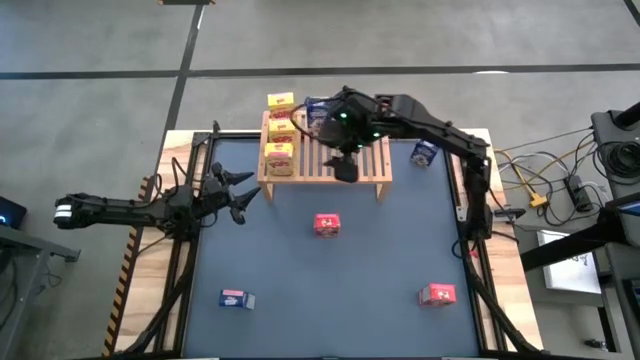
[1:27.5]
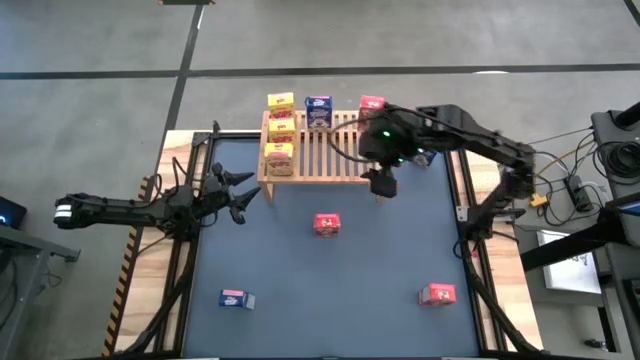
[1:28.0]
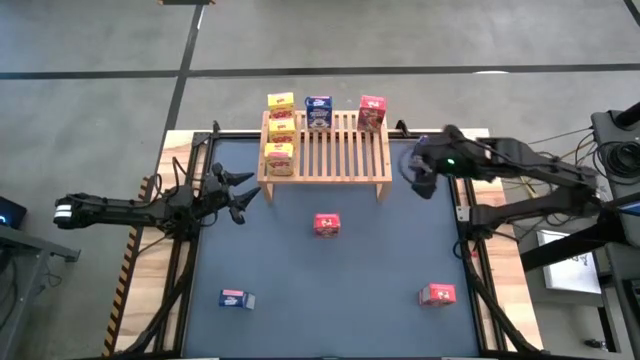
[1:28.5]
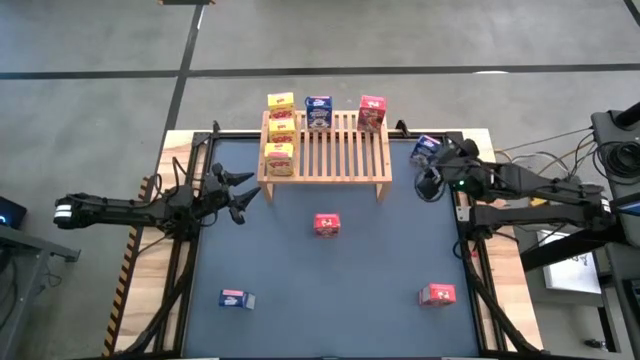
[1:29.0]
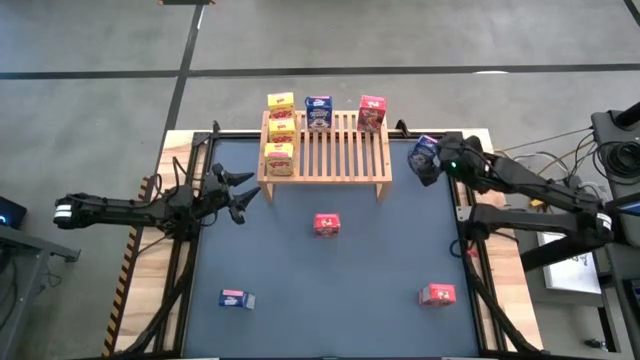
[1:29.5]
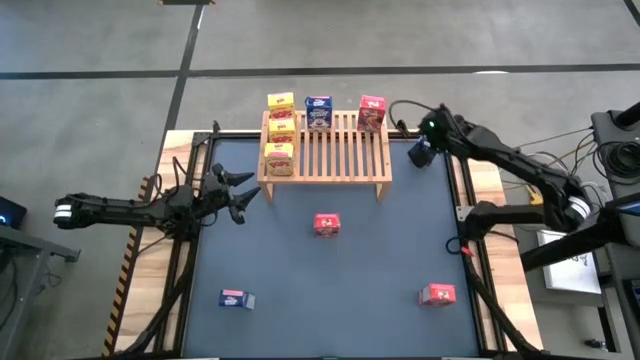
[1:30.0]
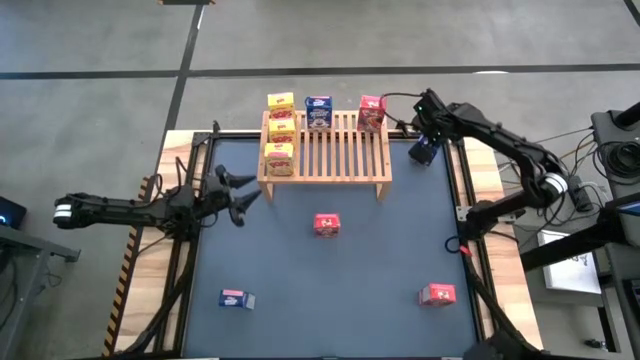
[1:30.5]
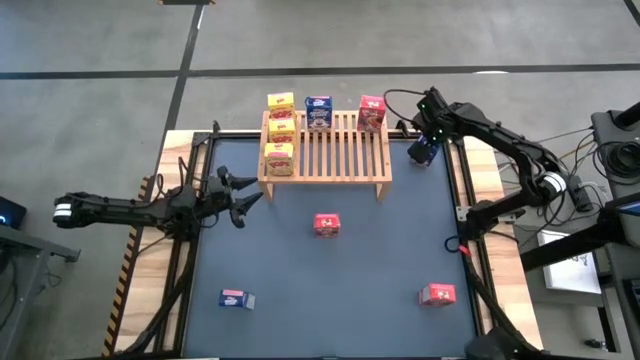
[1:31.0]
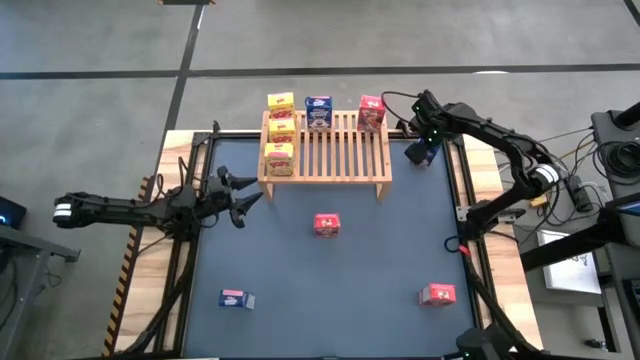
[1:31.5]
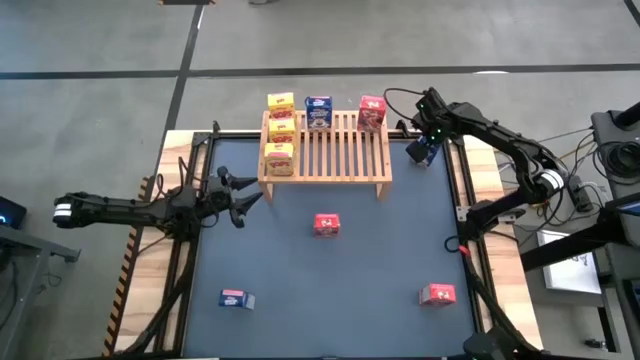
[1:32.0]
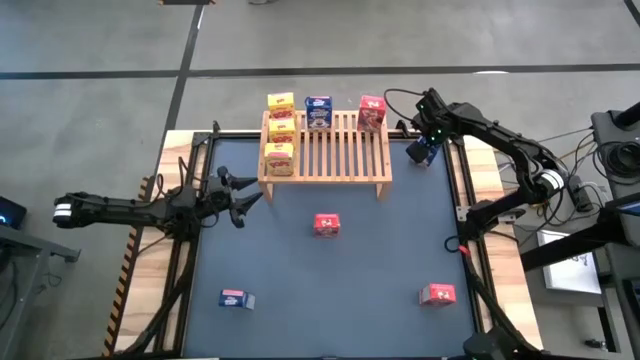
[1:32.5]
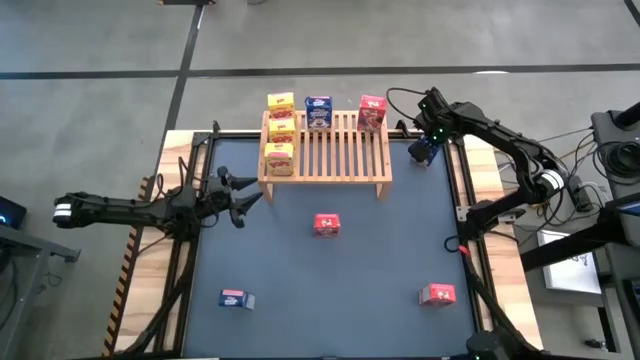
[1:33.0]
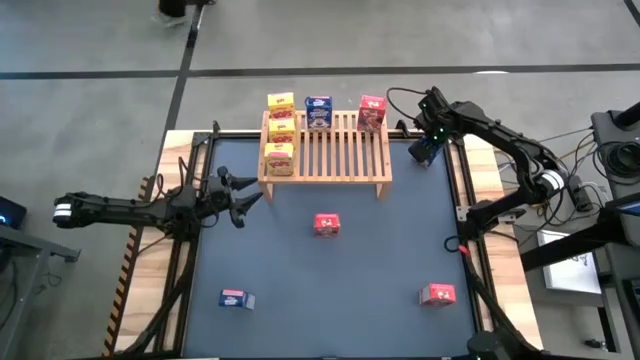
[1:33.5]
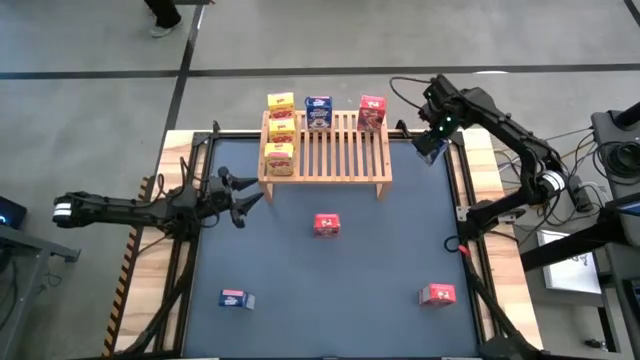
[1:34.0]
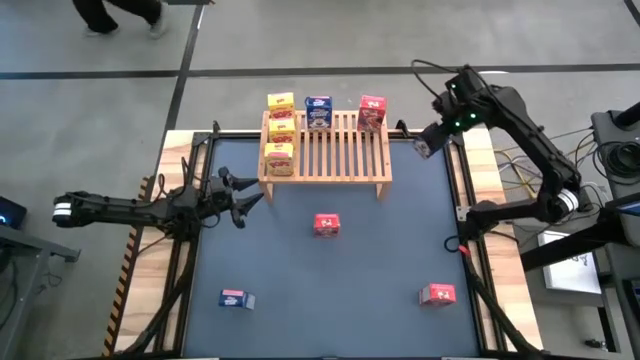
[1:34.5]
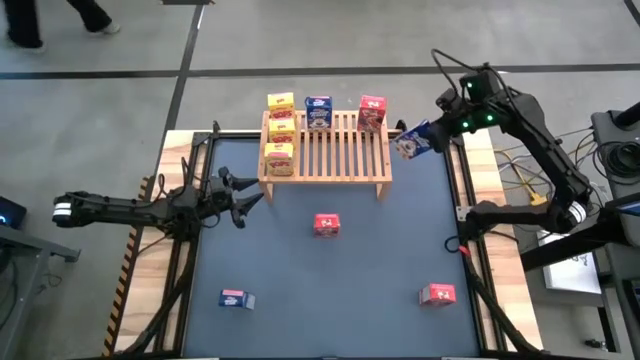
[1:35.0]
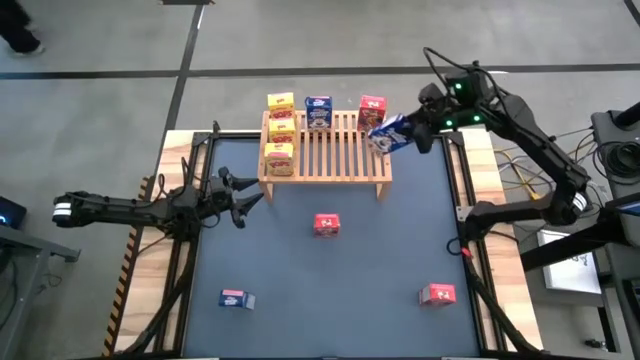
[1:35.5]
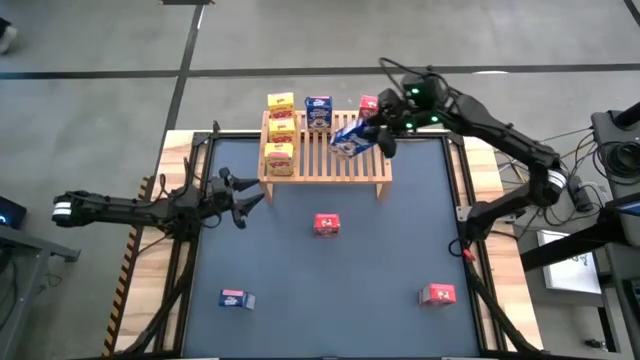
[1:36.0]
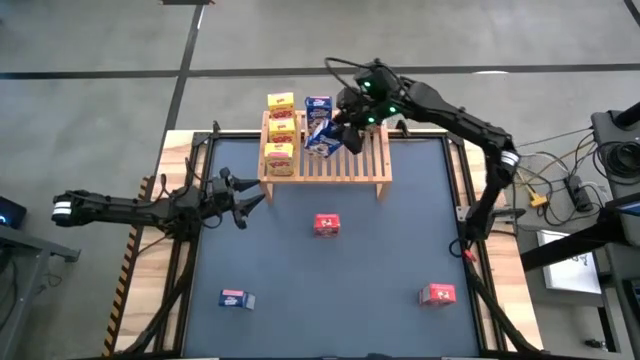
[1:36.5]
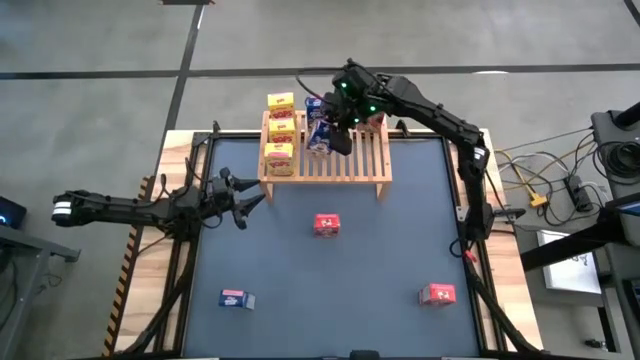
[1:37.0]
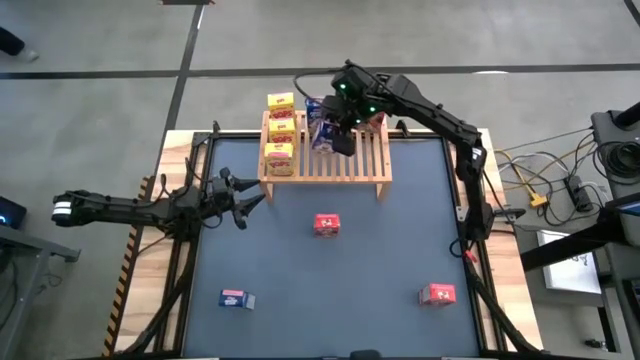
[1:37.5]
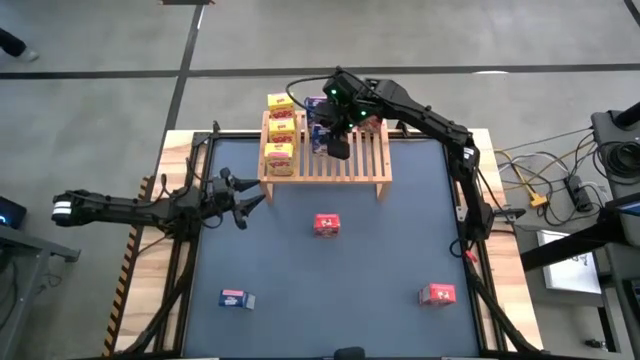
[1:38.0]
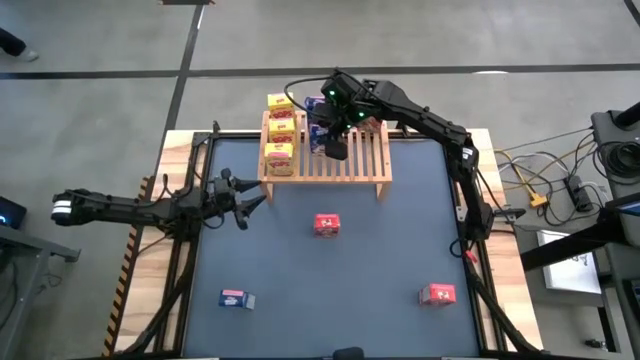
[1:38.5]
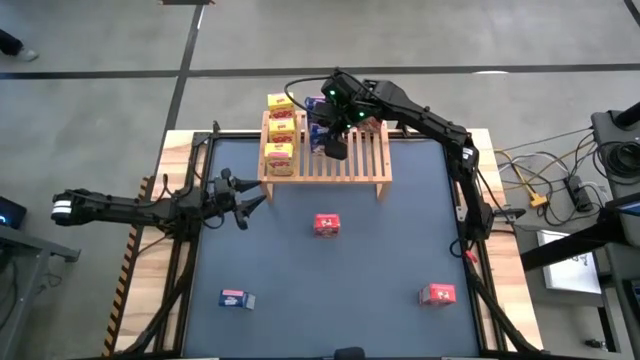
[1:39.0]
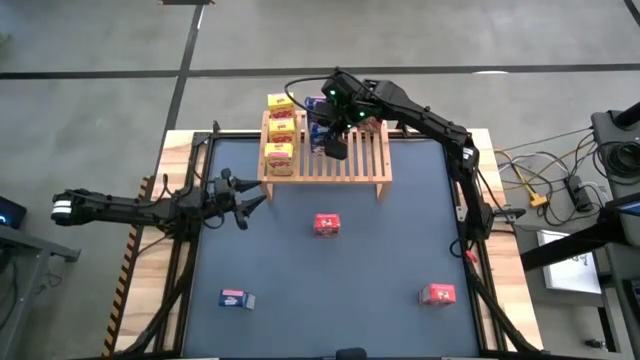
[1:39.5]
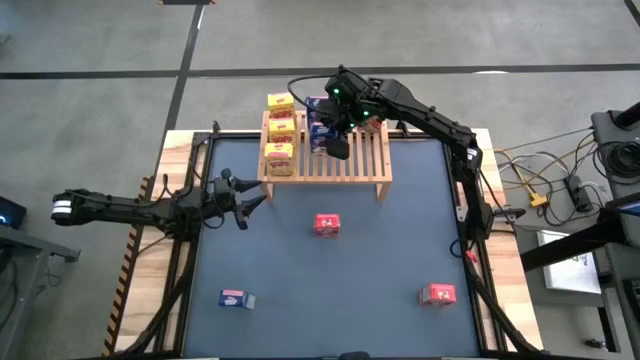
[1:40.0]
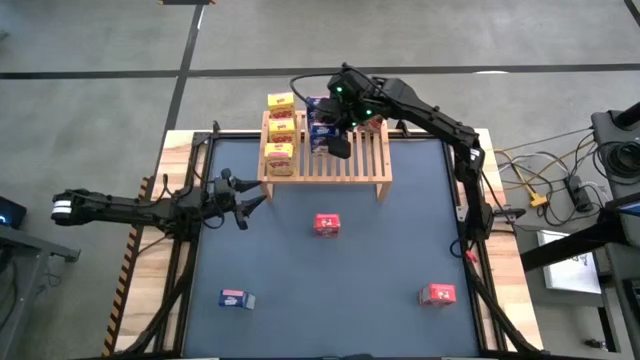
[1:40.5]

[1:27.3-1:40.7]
Task: Stack cereal on shelf
Put the top blue cereal box on the shelf aligned with the other blue cereal box

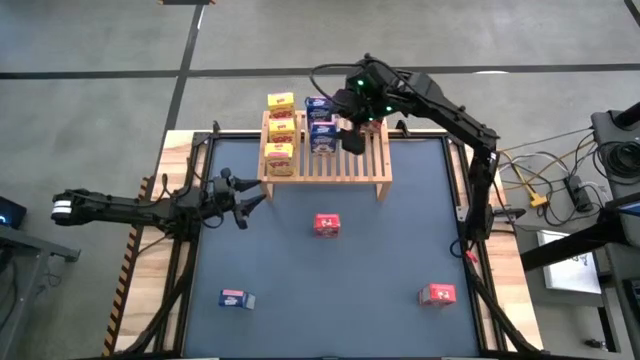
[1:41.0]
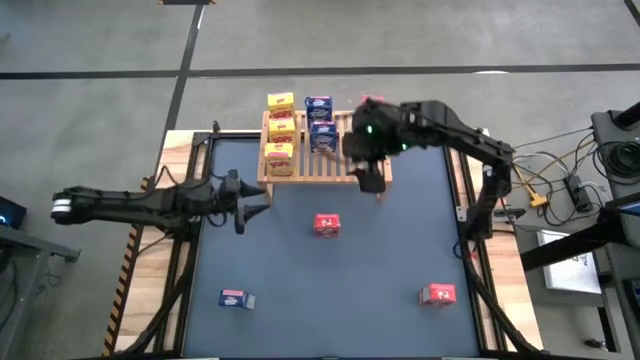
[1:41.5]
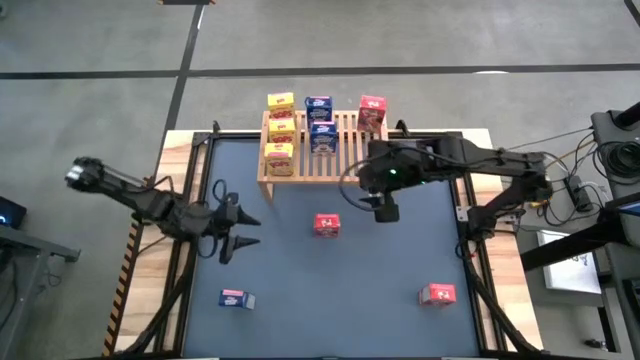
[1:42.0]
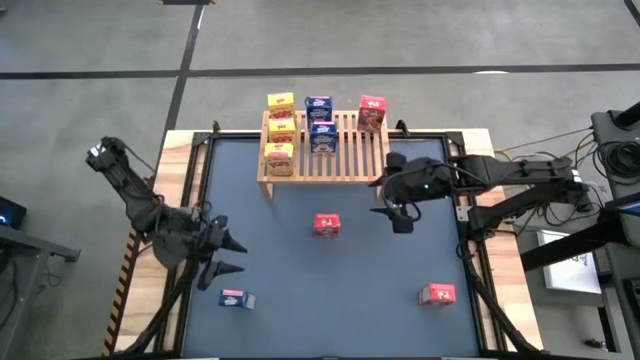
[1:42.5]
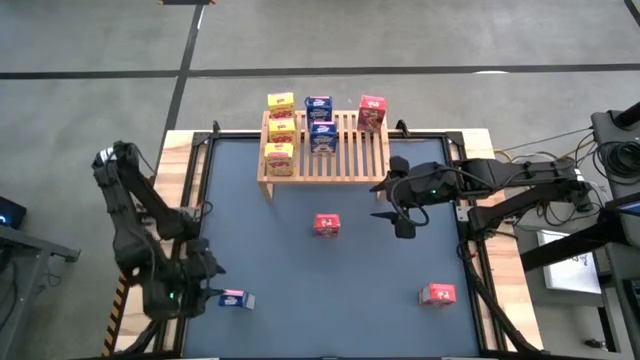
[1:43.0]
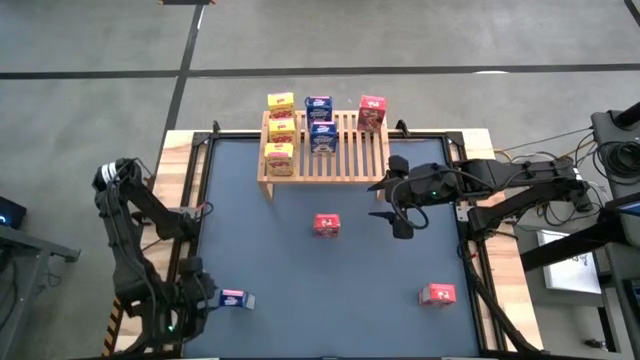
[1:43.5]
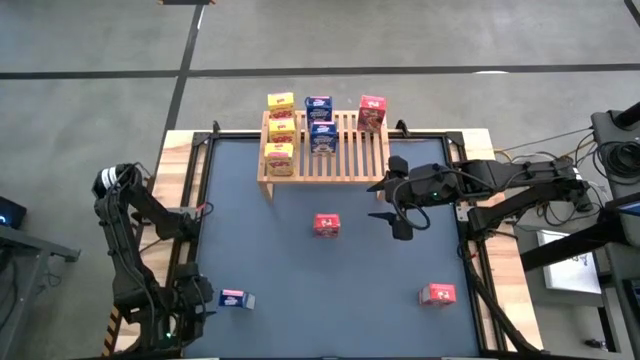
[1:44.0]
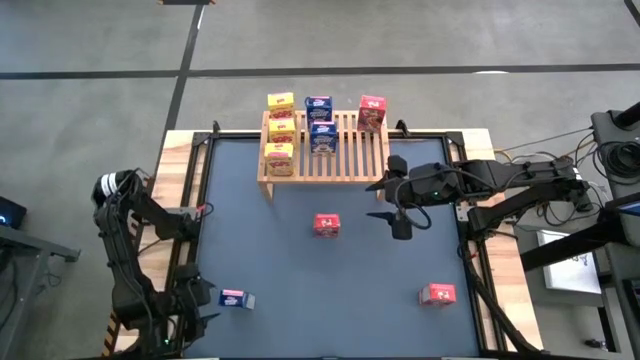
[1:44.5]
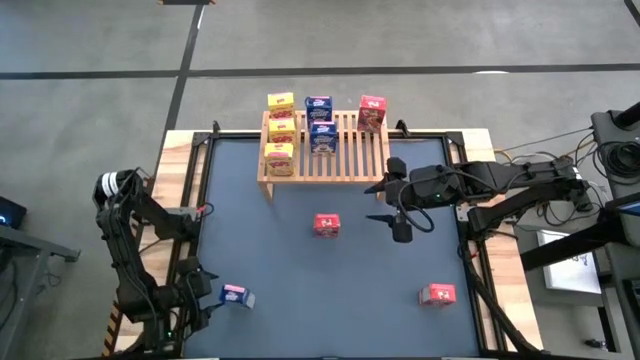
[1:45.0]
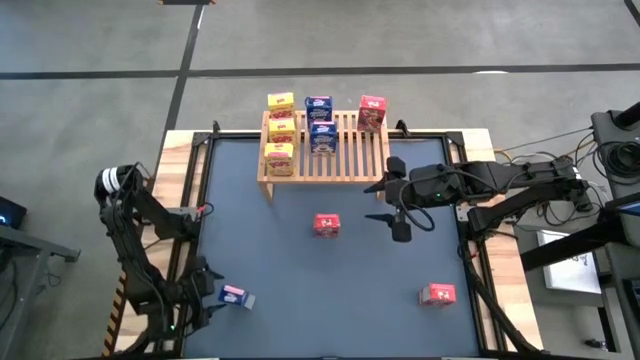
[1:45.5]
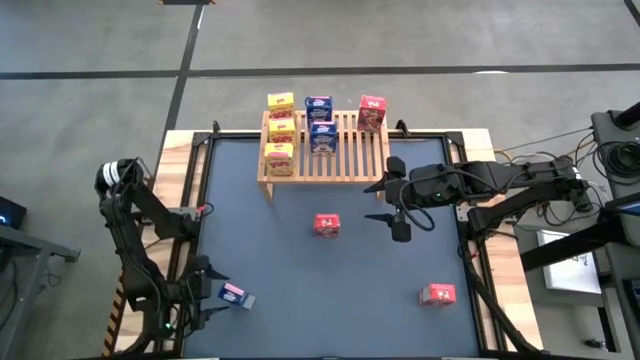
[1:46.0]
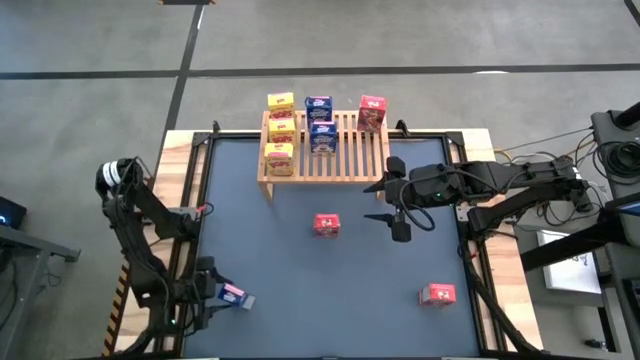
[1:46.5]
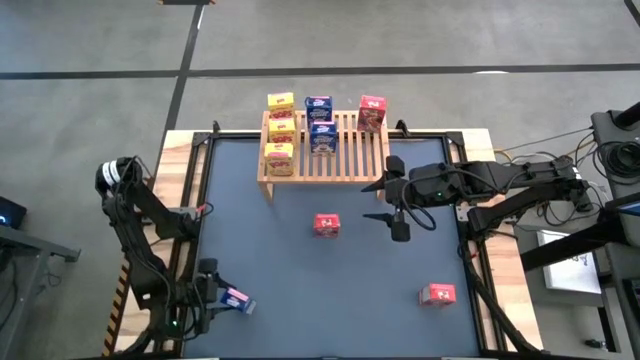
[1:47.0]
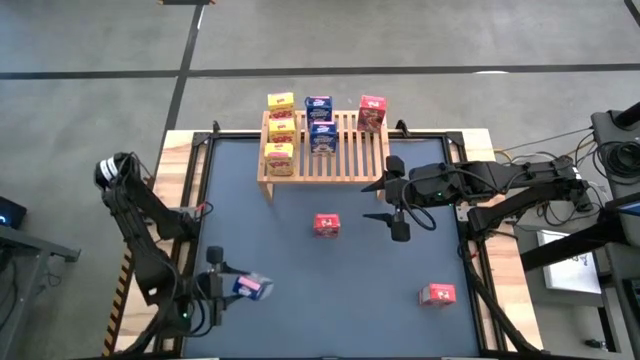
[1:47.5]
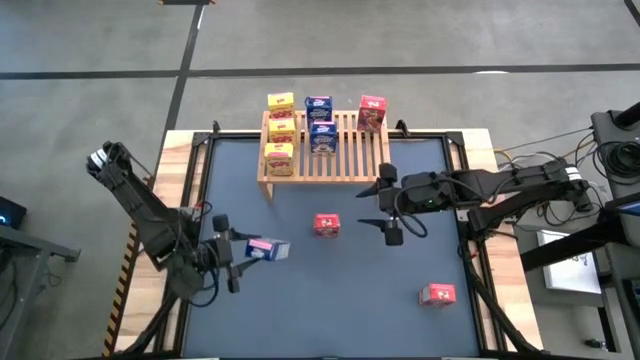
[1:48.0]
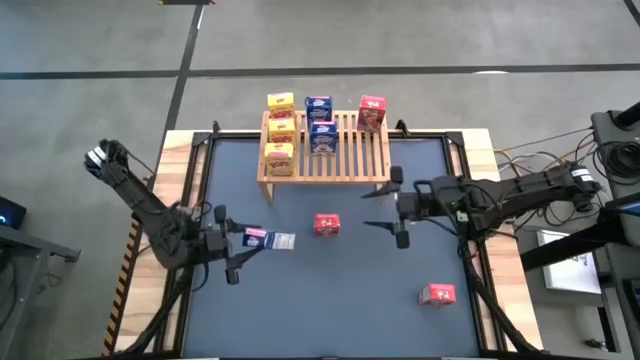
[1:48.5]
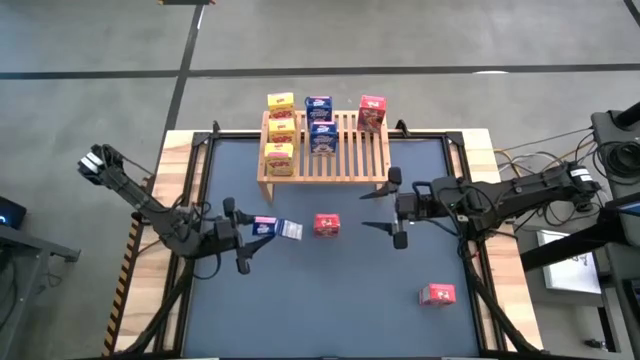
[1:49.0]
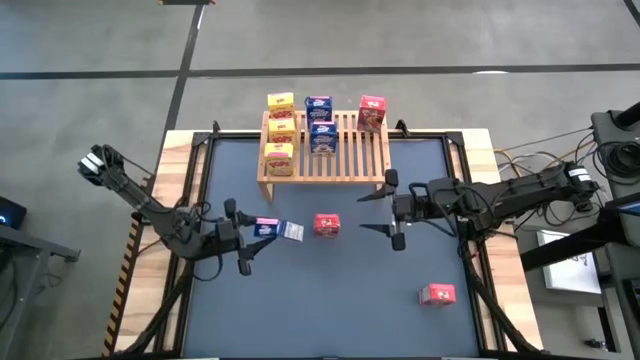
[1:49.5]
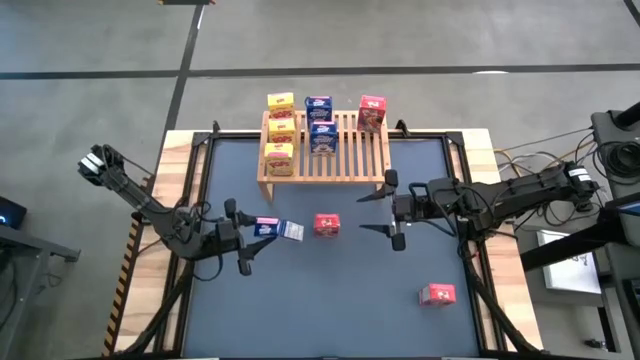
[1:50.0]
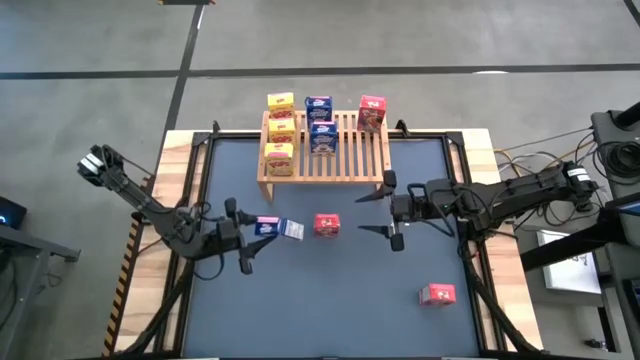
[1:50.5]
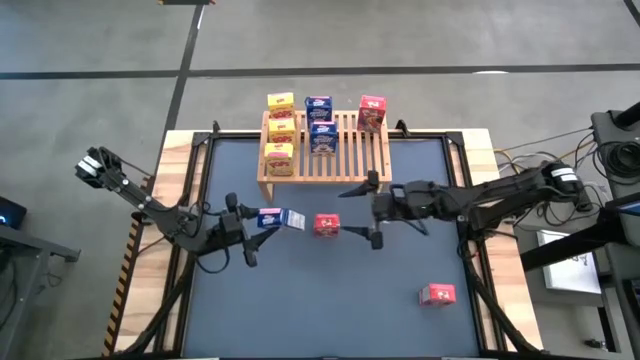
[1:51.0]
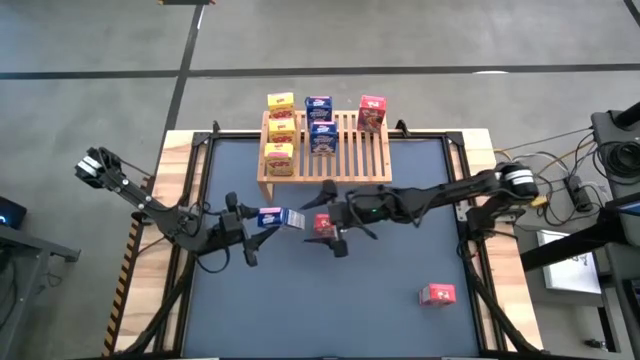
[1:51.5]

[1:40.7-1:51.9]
Put the blue cereal box on the shelf aligned with the other blue cereal box
